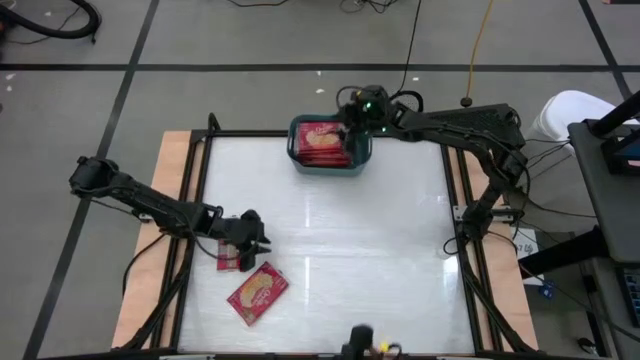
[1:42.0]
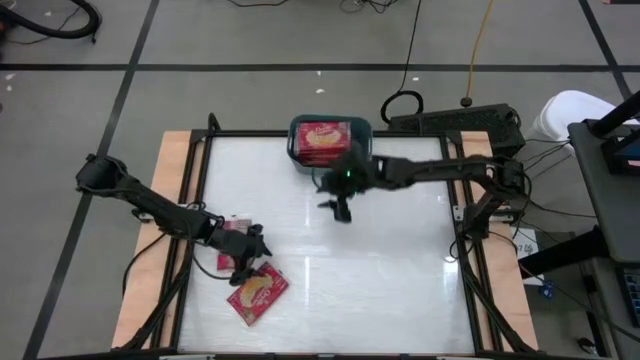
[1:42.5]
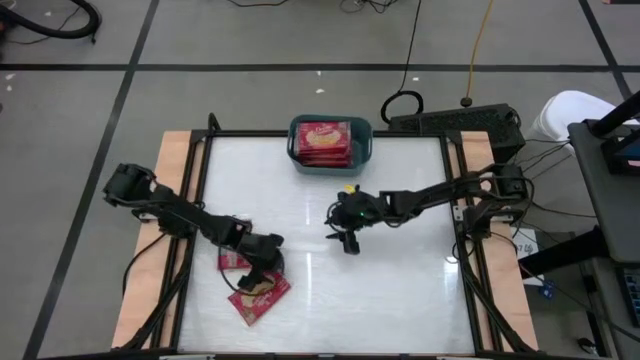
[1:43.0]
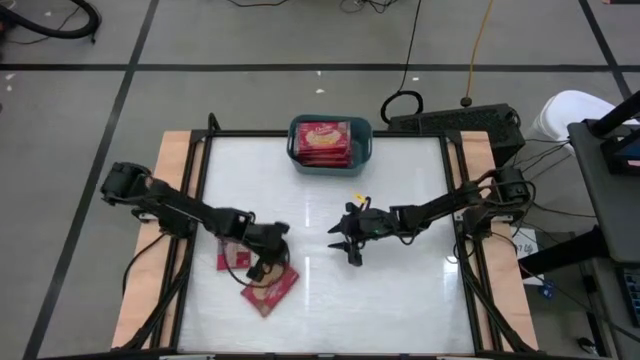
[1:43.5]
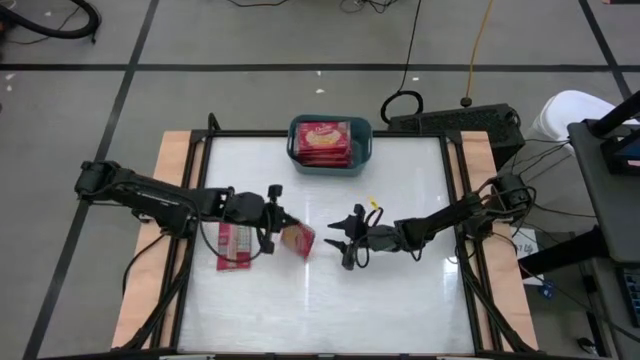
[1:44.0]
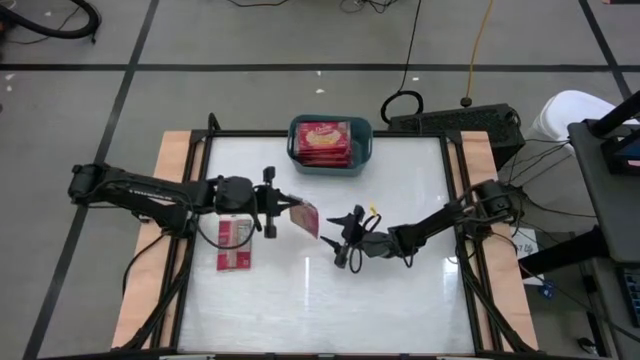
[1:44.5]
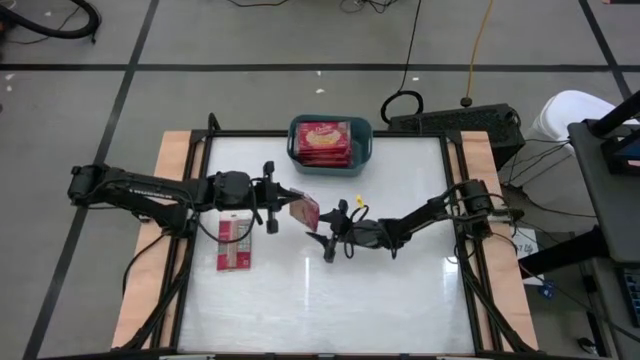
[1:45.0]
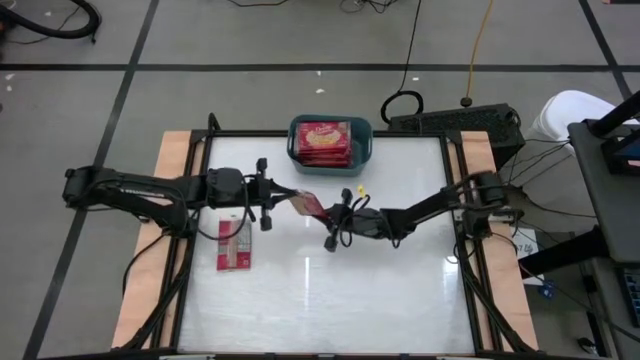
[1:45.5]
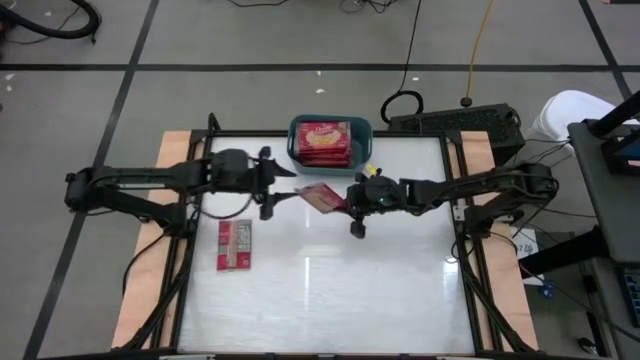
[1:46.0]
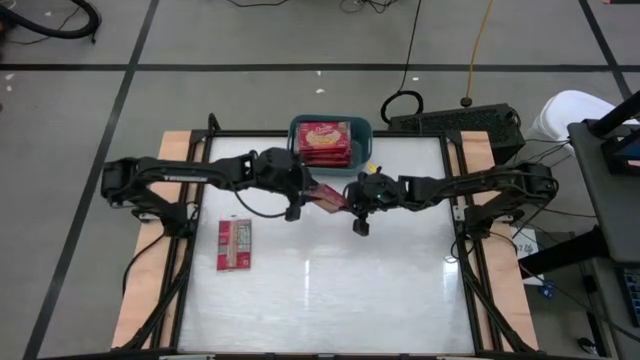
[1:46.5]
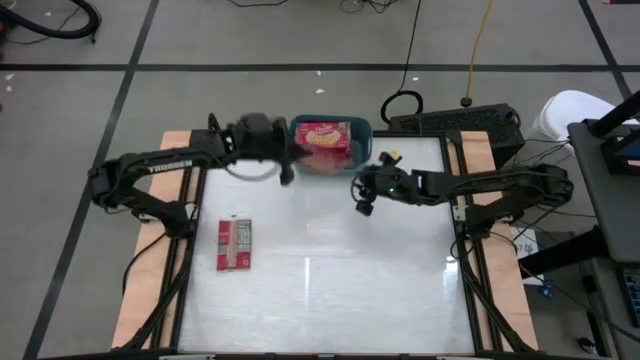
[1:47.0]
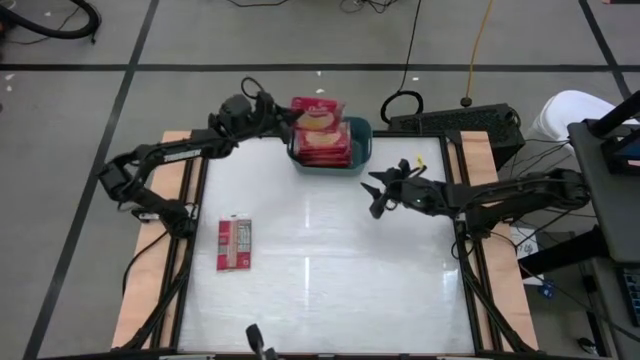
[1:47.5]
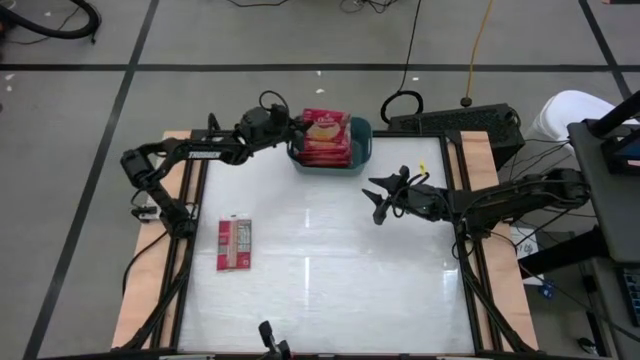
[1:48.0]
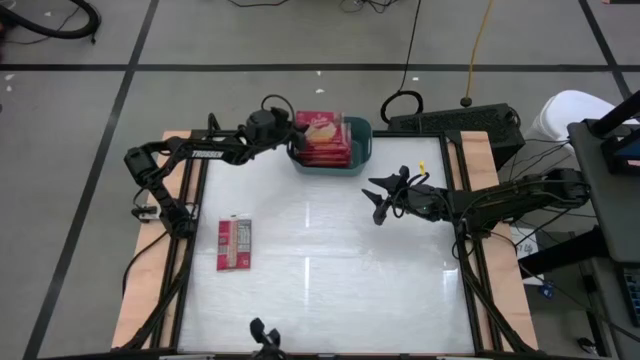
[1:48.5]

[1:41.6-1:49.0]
Task: Sort popcorn bags into baskets
Put the red popcorn bag into the green bin

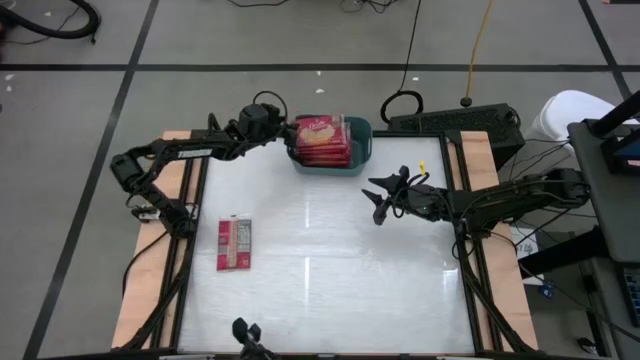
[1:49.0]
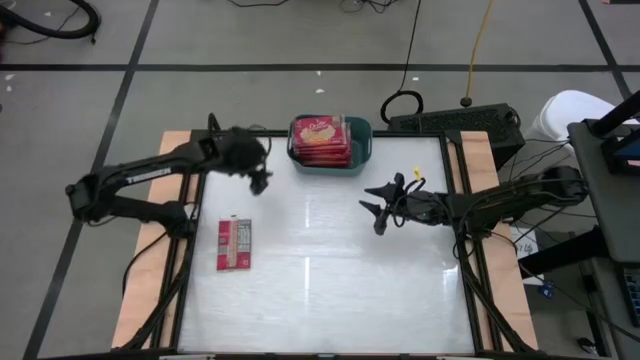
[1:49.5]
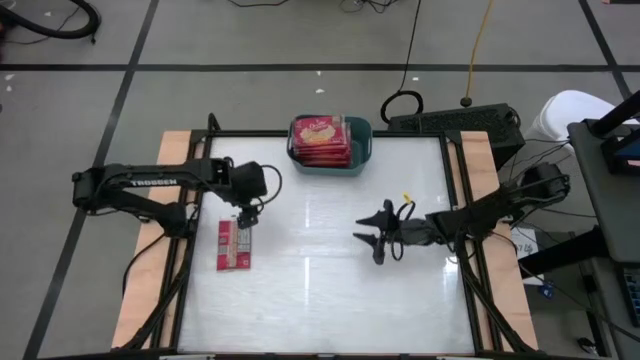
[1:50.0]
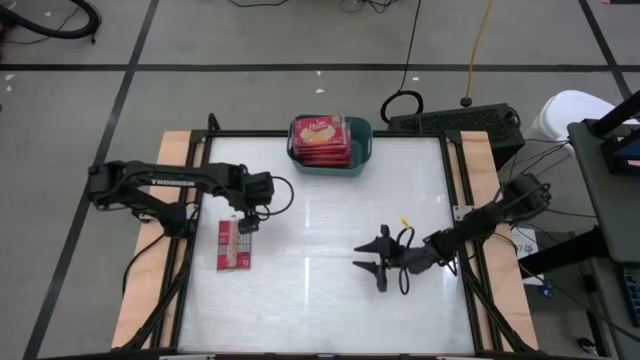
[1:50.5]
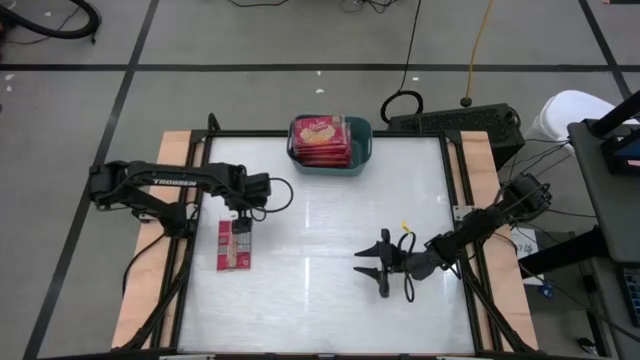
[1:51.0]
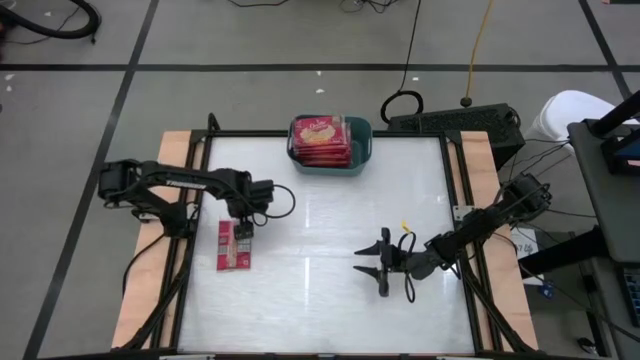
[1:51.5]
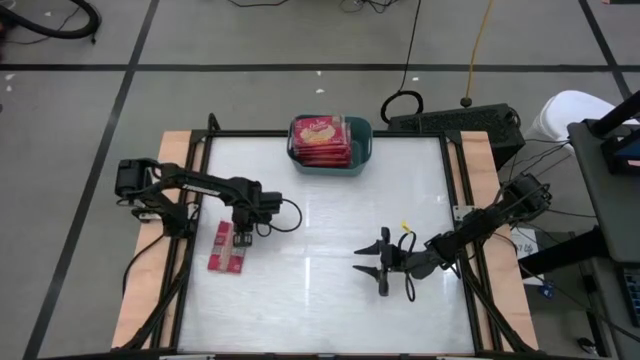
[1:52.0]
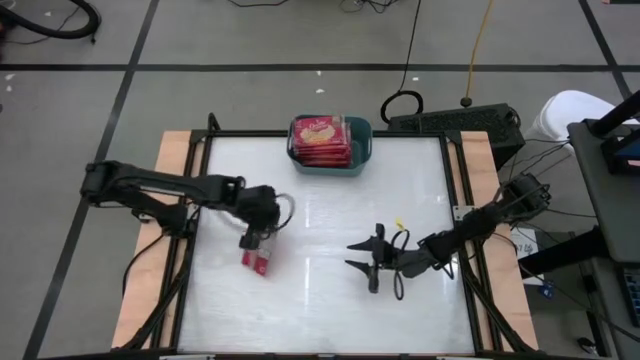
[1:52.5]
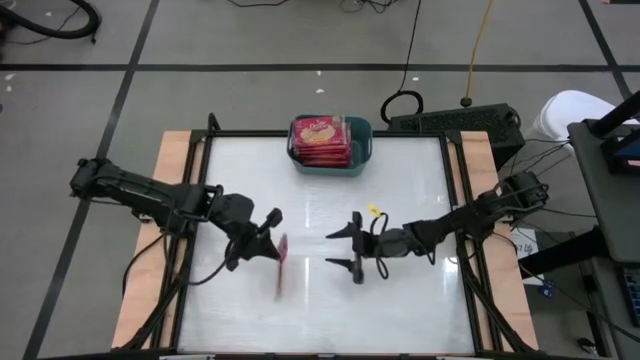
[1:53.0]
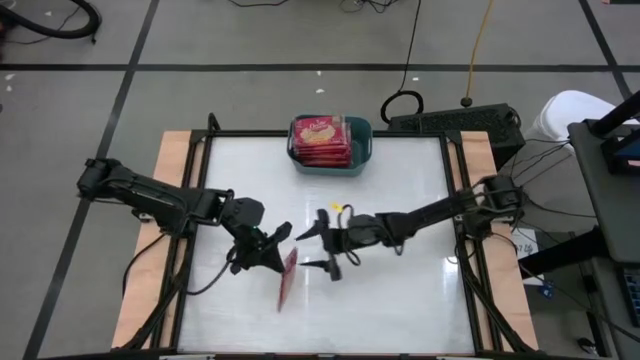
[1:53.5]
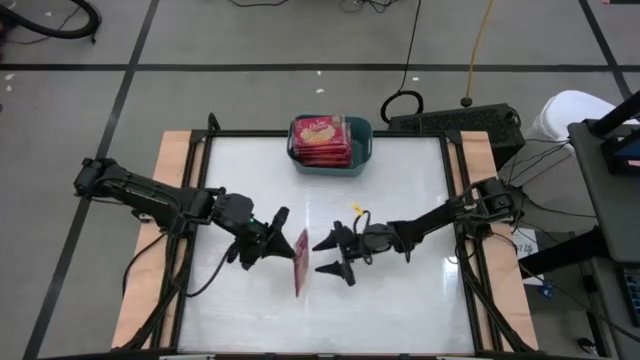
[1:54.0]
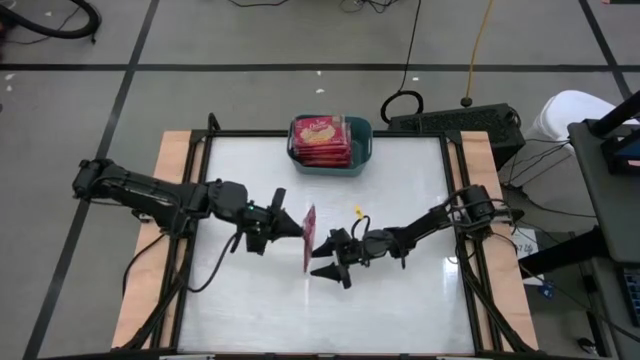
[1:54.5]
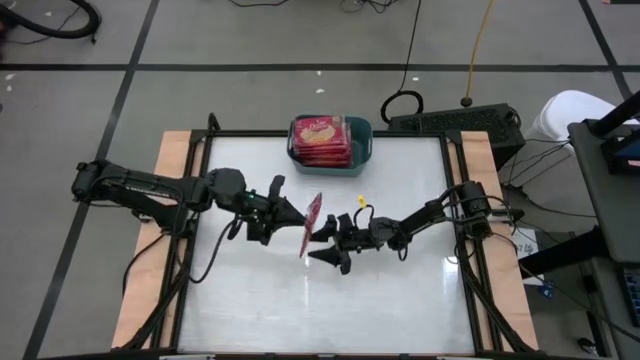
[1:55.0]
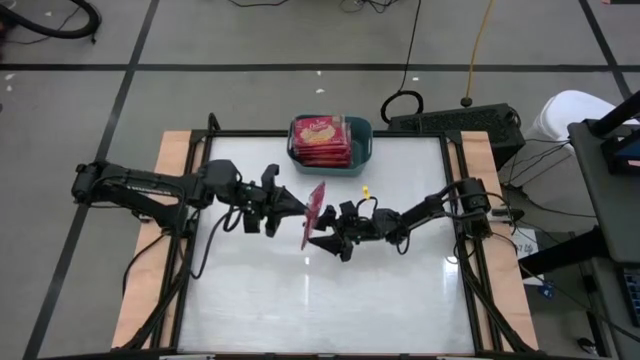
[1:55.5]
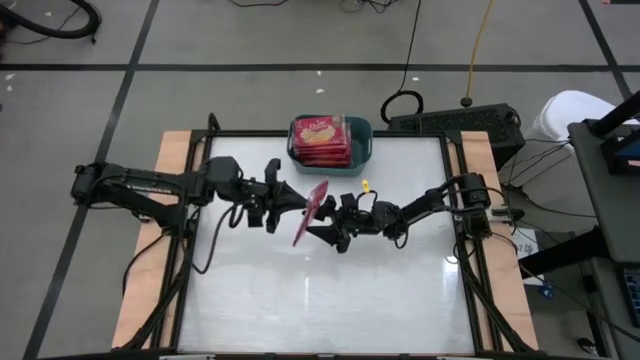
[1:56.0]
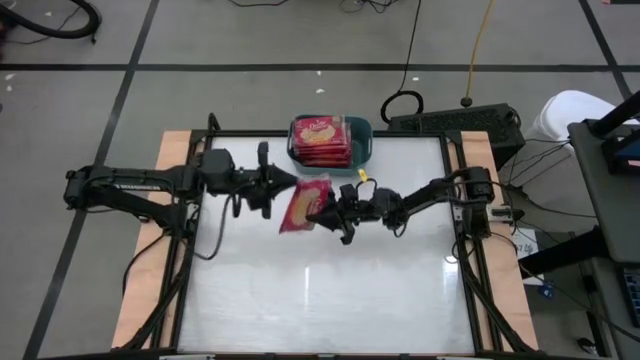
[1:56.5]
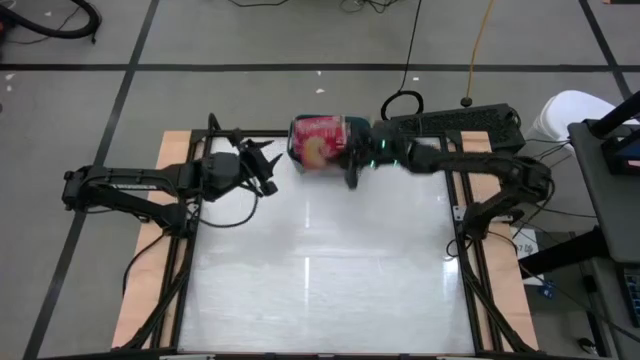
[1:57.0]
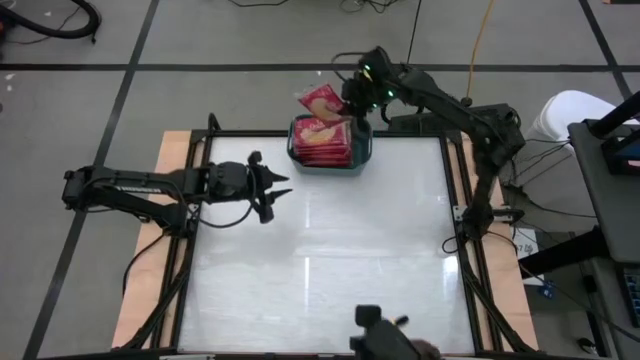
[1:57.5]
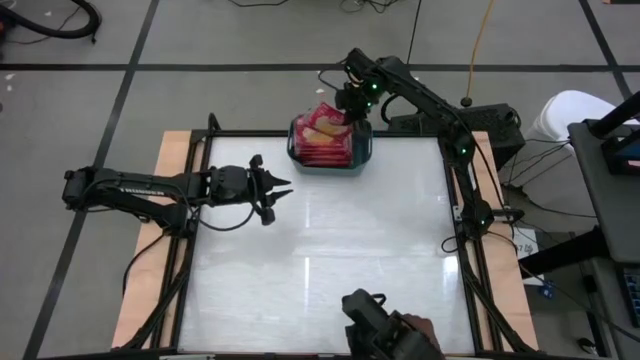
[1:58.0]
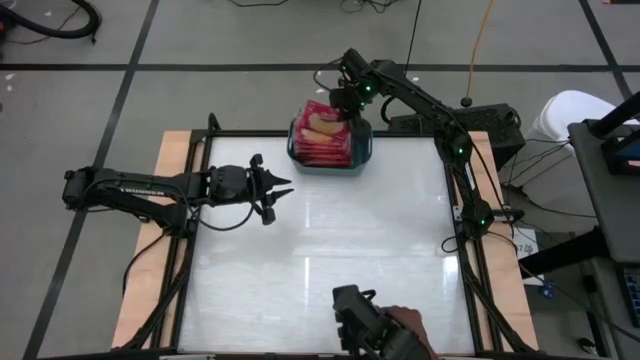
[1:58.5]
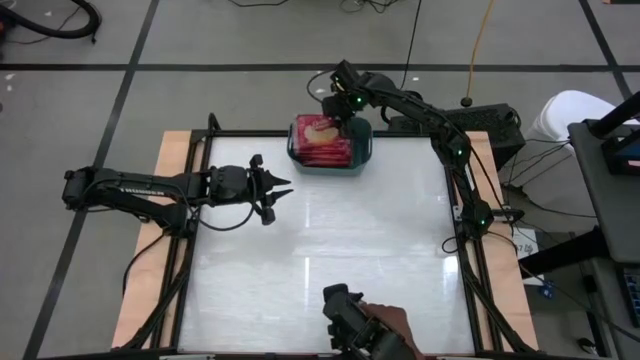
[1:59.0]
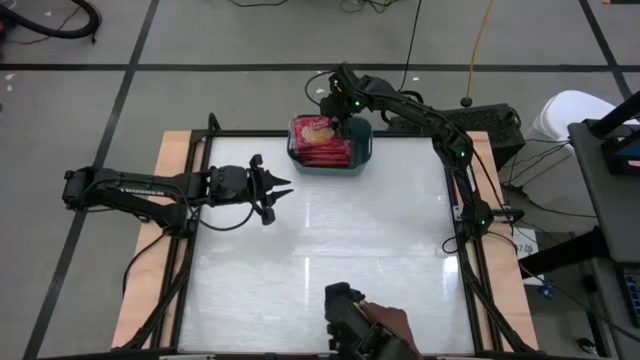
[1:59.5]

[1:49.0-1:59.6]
Put the red popcorn bag into the green bin

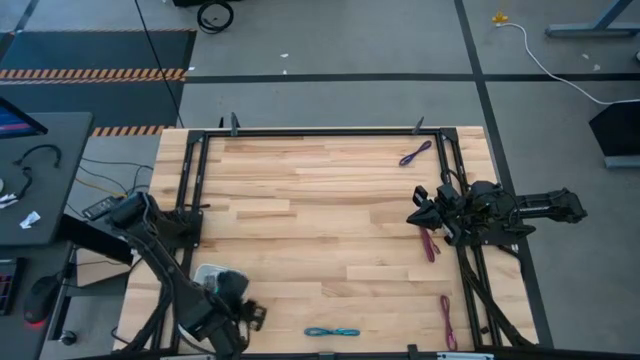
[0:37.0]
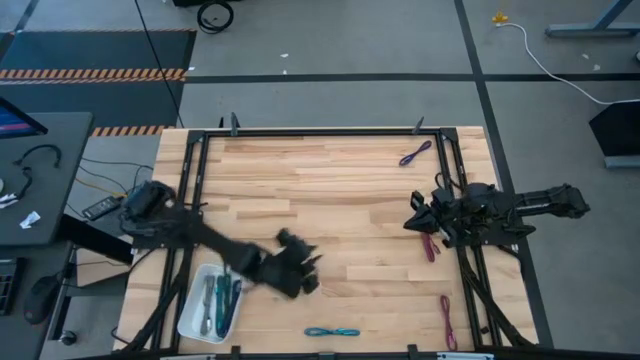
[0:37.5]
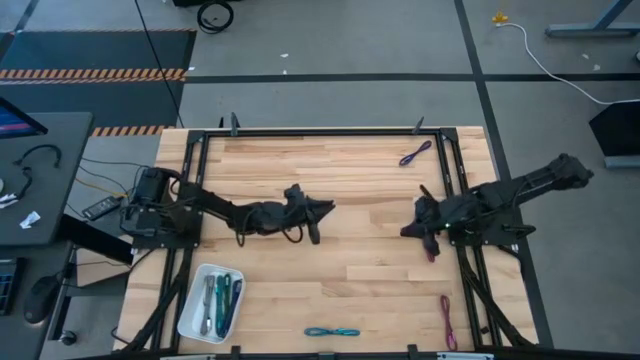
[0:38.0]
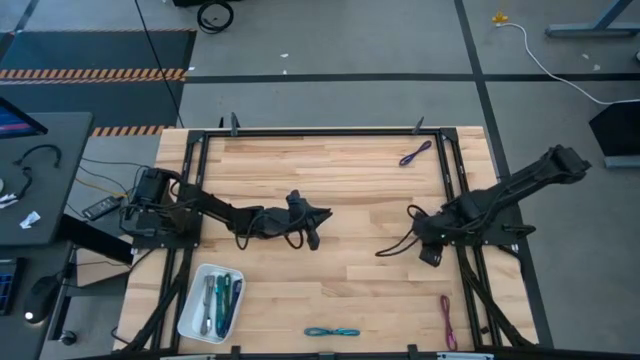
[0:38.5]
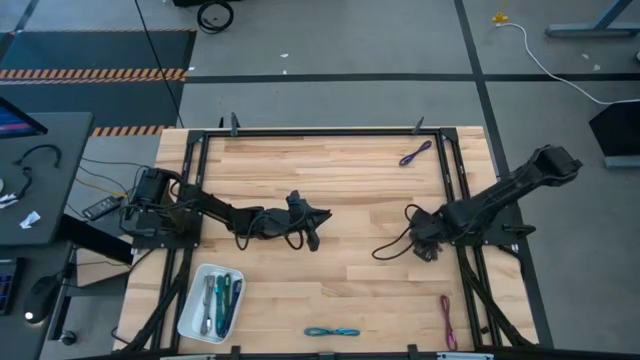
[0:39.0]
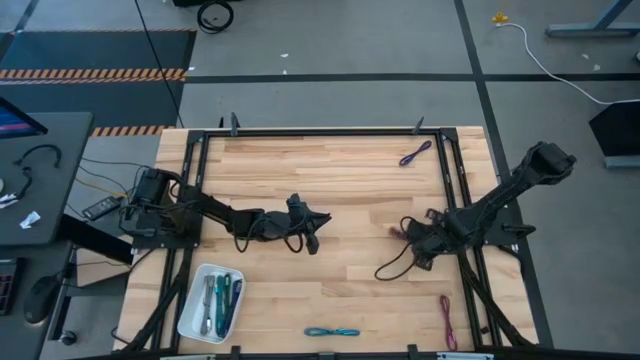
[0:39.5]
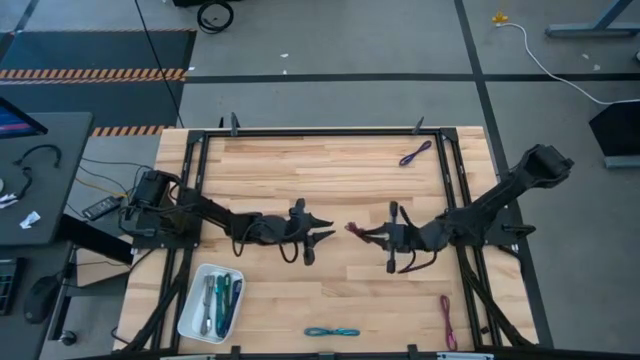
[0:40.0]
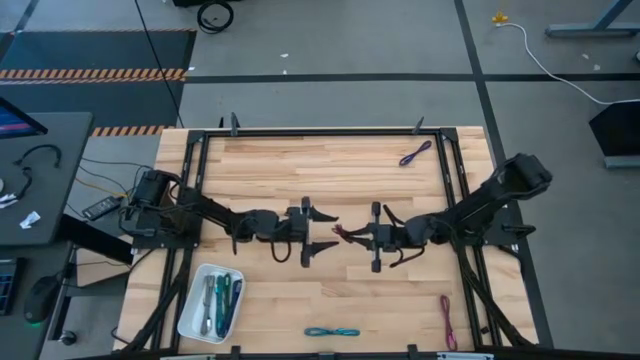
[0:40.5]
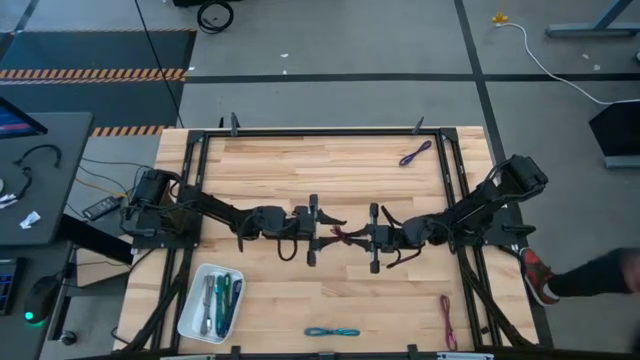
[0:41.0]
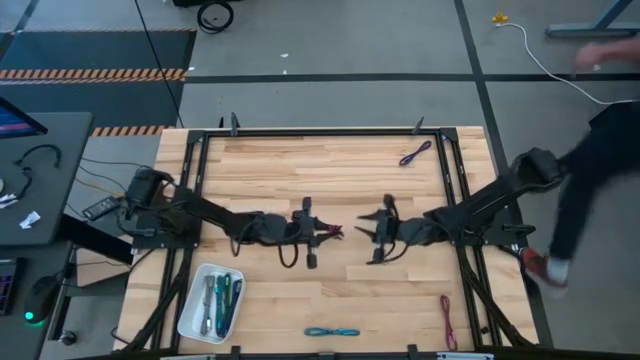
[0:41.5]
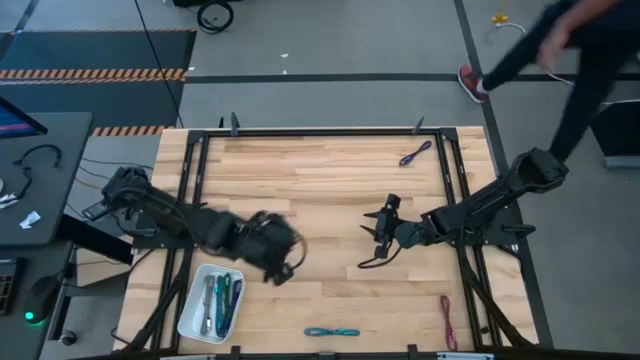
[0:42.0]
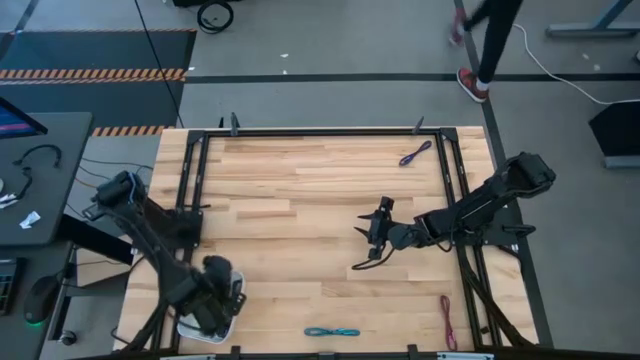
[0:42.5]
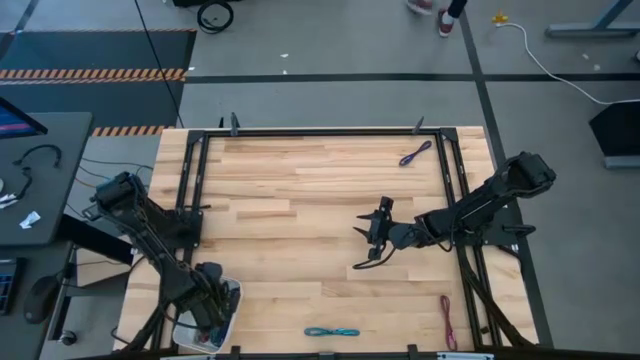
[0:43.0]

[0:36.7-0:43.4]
Task: Pick and place USB-C Cables
Put the top pink charger cable into the white bin
